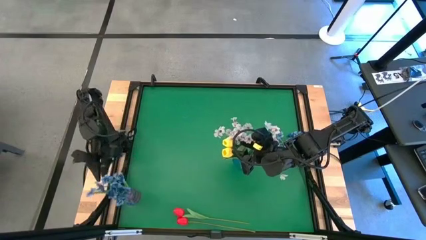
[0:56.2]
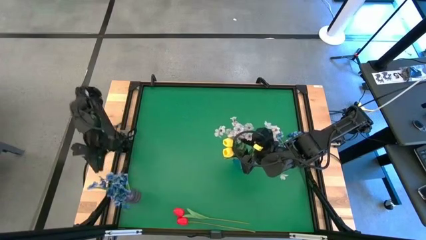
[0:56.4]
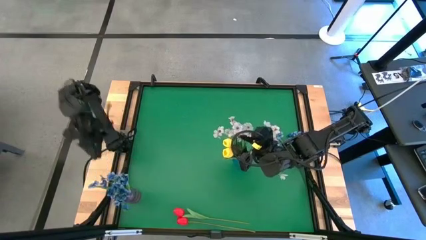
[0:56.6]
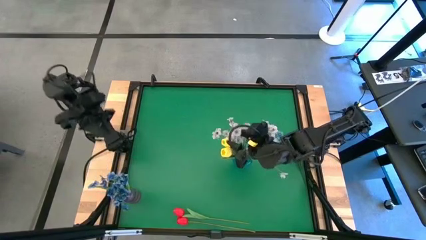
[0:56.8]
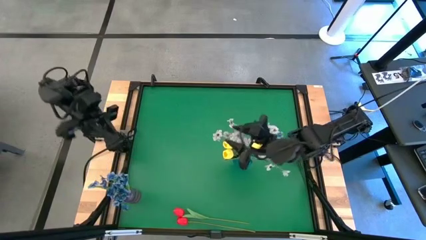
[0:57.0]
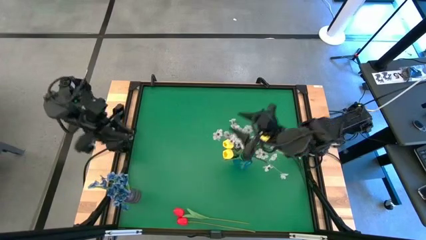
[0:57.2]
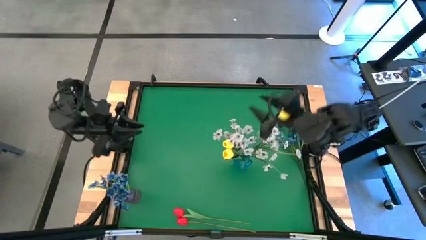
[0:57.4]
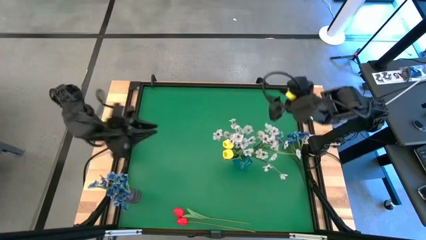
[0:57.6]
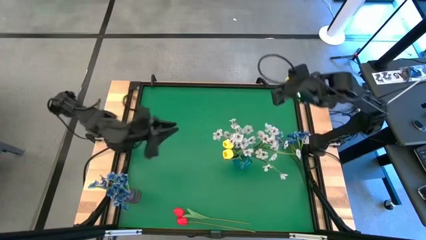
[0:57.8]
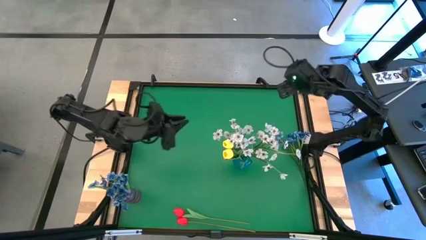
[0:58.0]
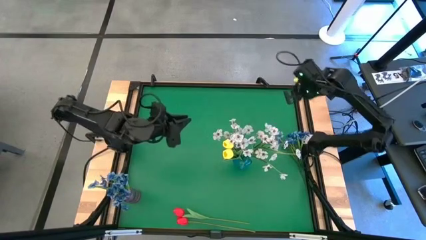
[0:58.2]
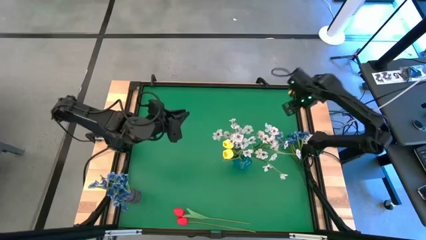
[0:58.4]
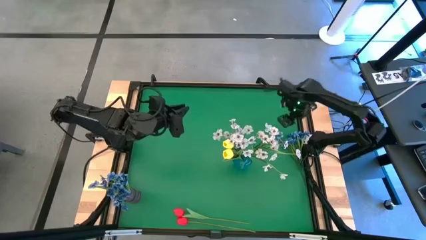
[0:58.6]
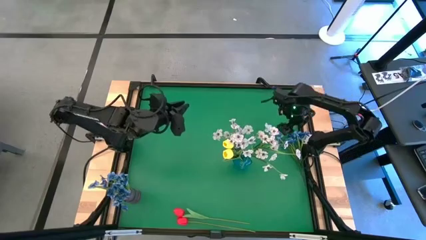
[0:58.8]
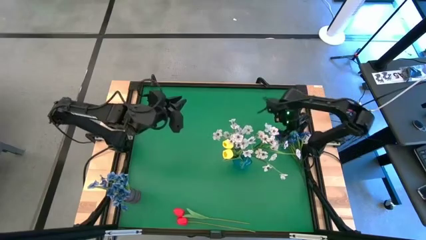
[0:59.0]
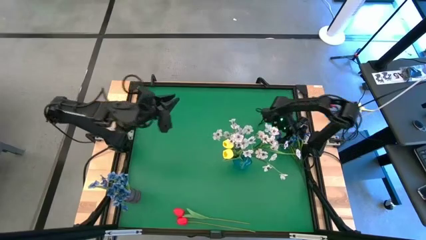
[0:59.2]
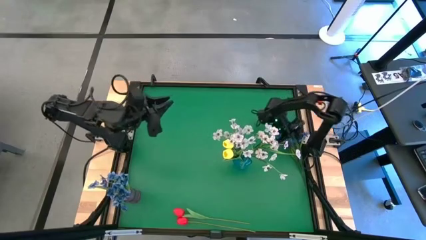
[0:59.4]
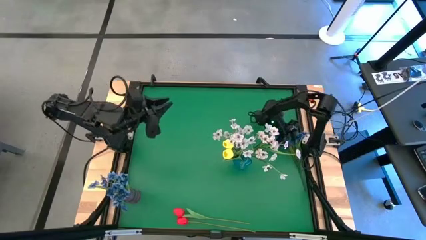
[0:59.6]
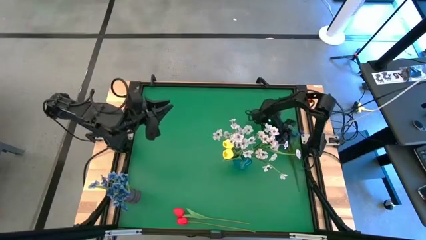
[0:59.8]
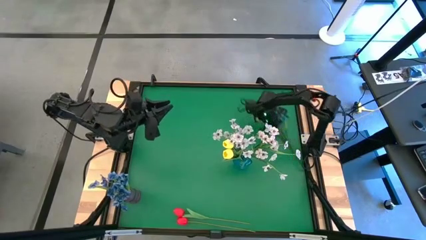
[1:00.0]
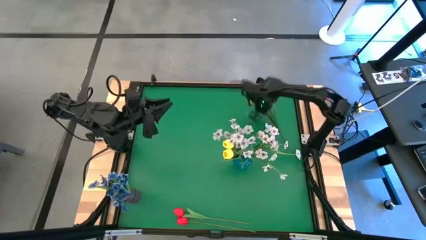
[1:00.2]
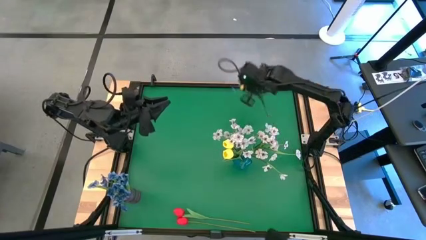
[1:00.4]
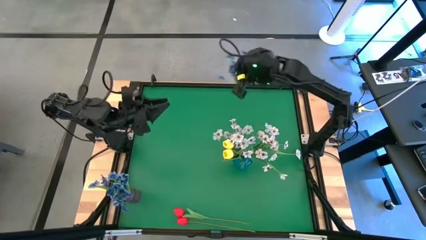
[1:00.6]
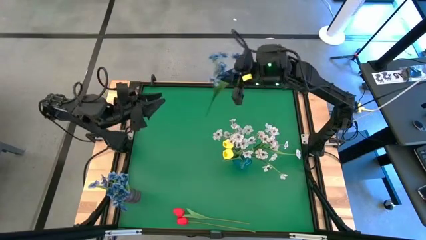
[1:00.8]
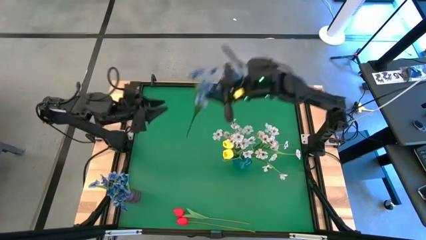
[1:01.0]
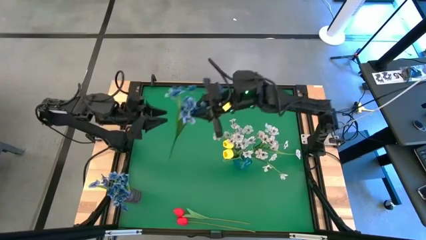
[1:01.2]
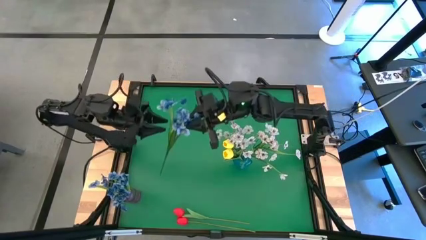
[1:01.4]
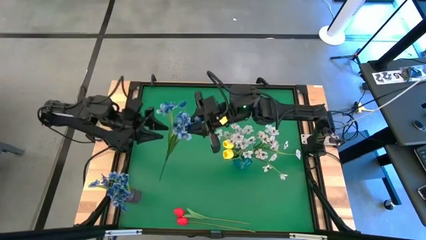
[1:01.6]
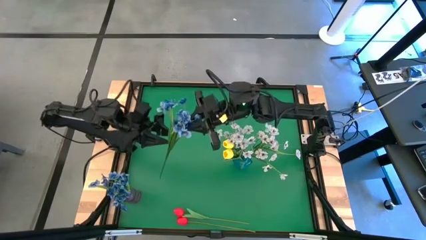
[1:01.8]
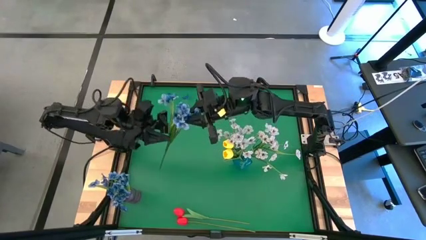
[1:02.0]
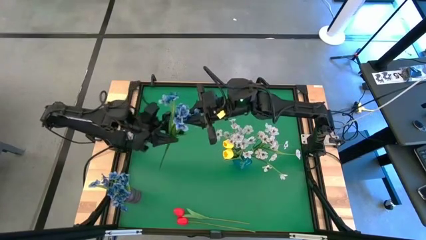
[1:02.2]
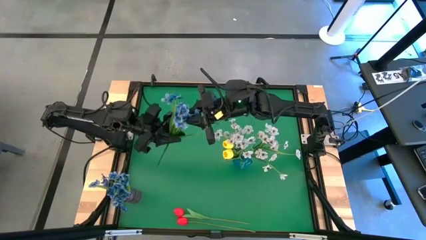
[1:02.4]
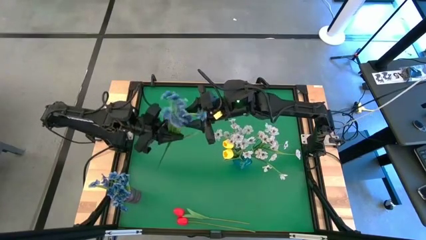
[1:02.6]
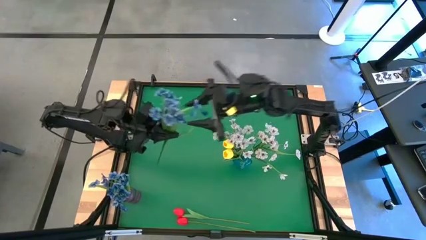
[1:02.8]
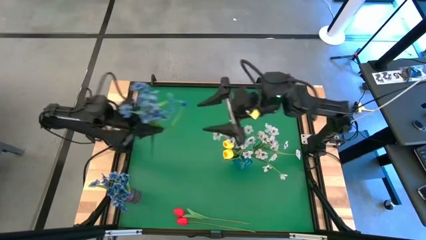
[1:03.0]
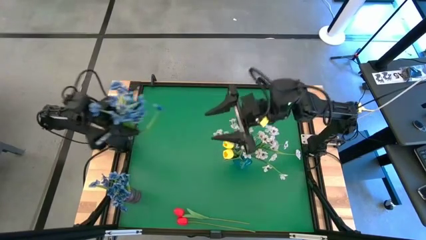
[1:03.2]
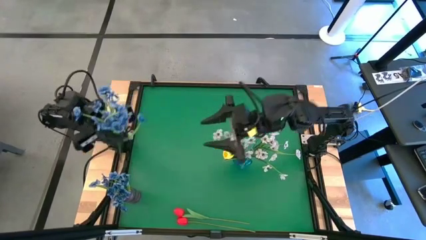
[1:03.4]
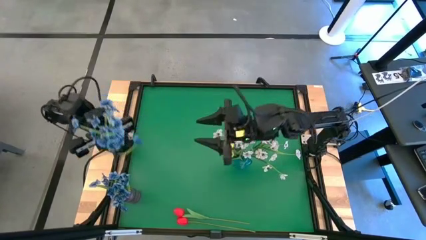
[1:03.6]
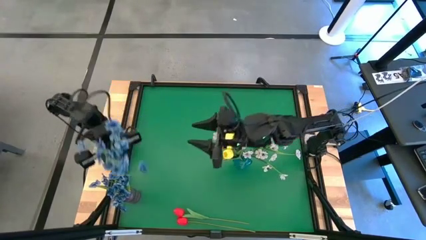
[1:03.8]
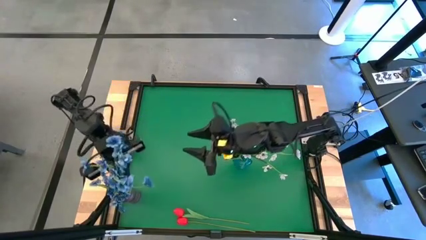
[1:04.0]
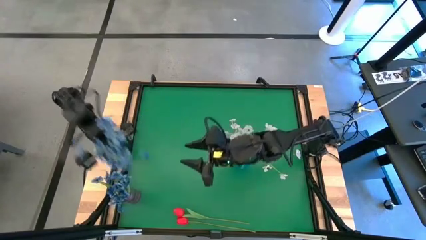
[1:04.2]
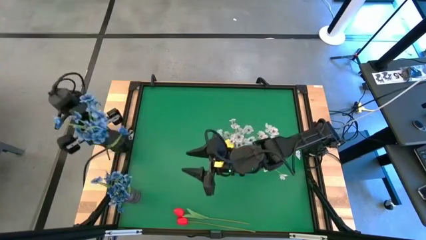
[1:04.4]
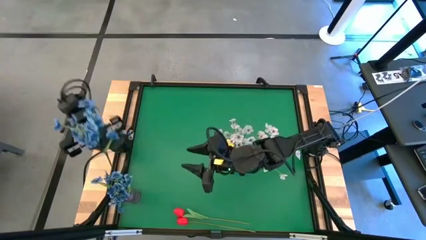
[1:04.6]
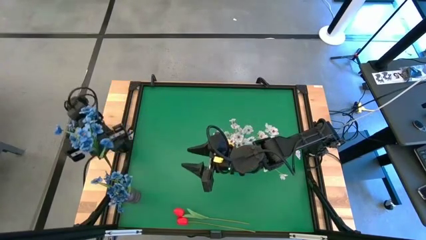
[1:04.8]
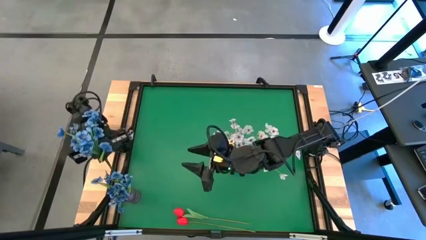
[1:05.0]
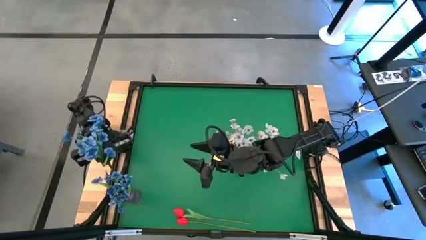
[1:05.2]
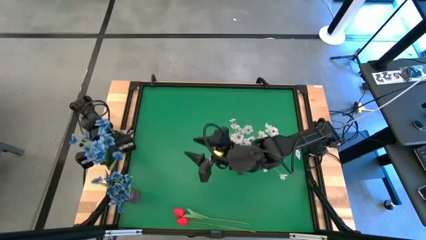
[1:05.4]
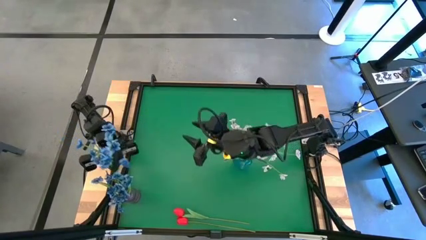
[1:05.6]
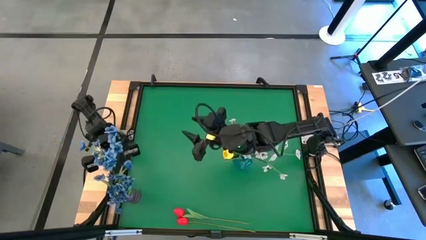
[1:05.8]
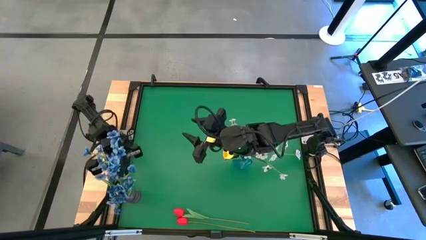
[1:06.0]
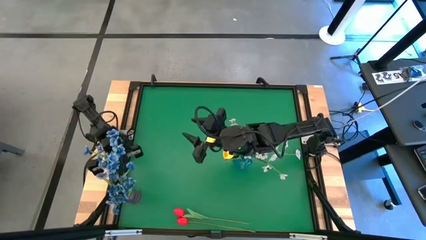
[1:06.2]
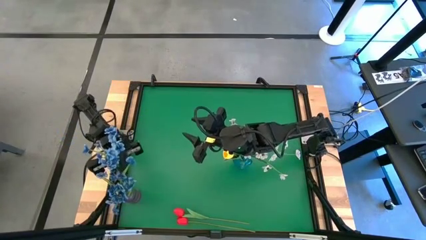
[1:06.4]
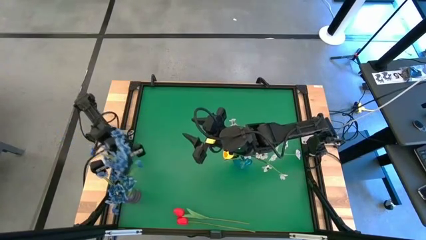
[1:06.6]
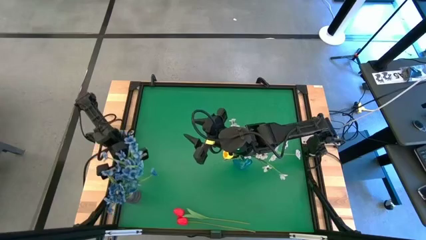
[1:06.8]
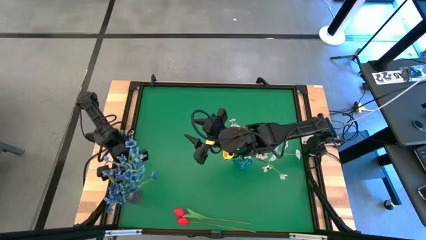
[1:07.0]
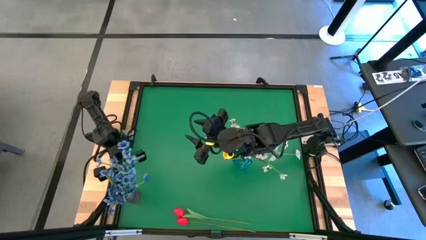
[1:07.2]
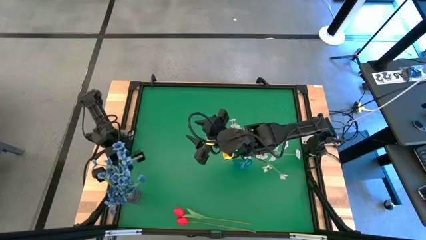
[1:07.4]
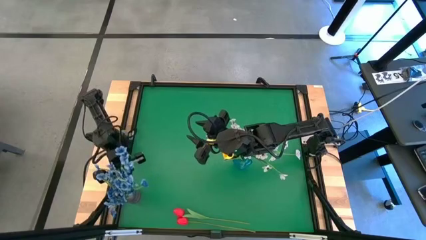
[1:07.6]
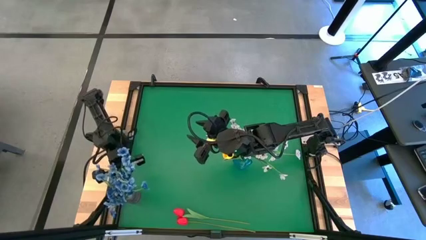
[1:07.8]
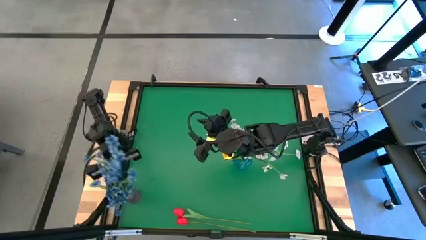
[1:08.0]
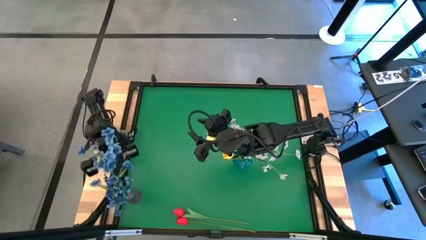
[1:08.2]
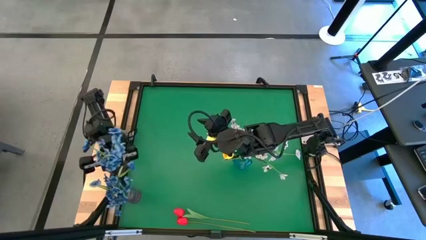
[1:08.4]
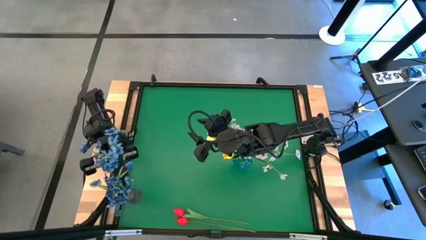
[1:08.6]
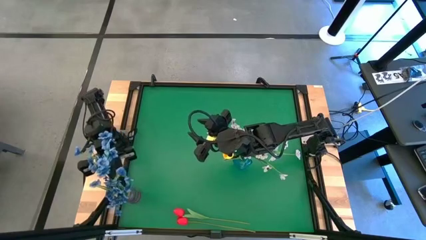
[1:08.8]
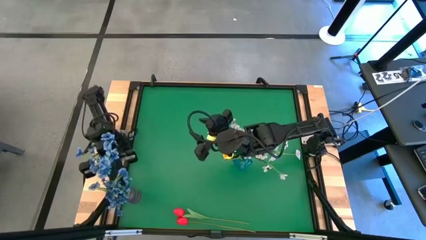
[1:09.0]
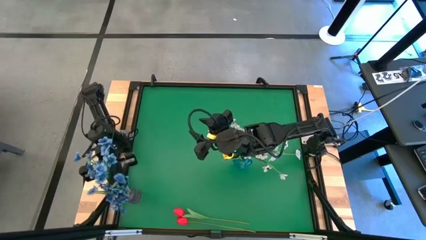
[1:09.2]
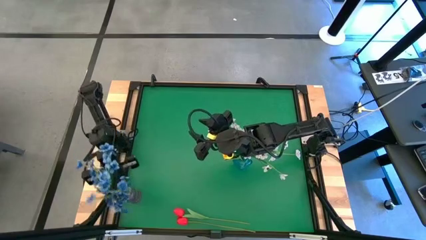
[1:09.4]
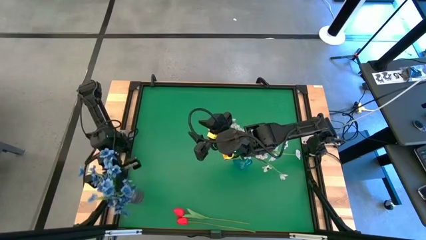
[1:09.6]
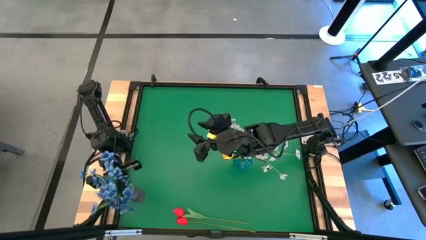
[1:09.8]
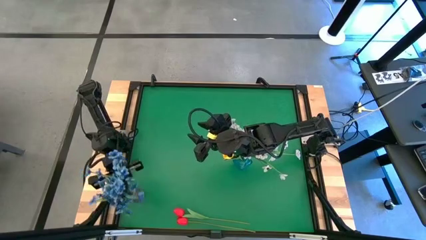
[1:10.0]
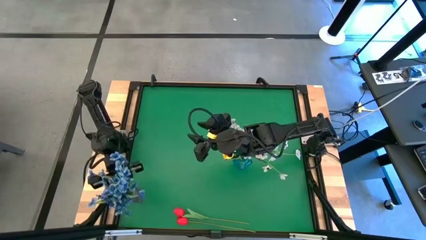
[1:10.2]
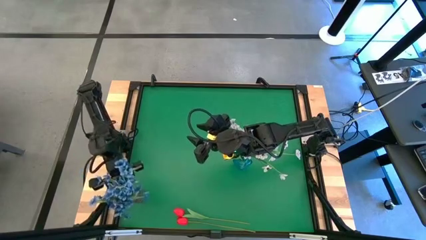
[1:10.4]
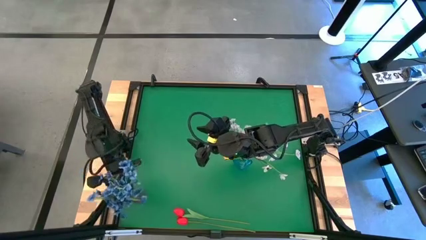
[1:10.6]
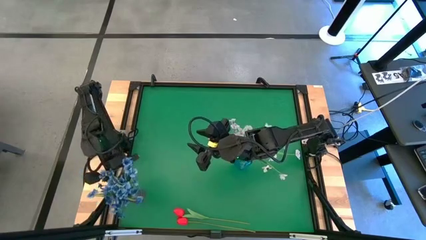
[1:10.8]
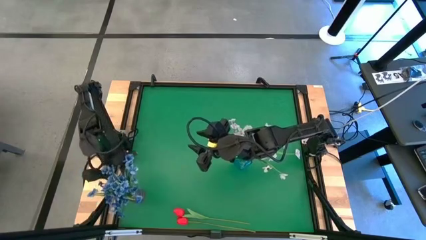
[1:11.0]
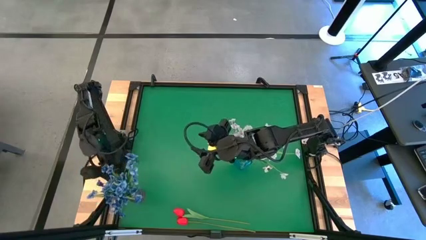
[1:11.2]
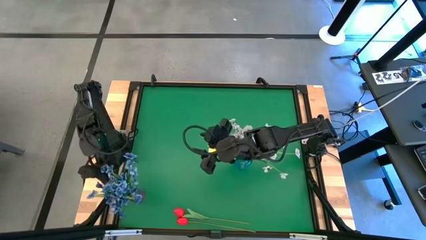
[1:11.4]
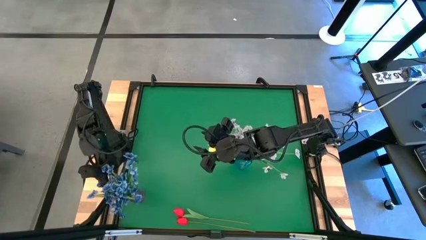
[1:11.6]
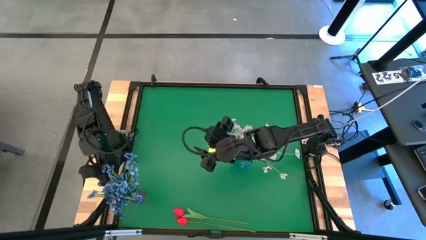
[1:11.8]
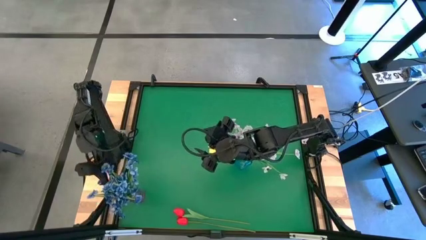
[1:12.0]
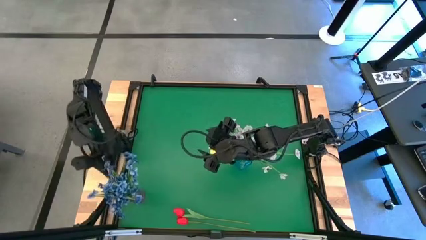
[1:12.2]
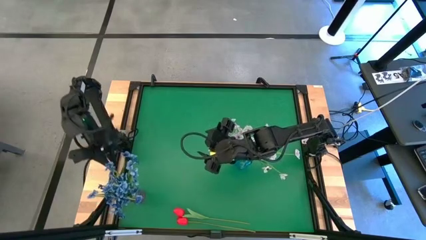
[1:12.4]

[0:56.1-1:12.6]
Task: Sort flowers into vase by color
Put the blue flowers into the violet vase
